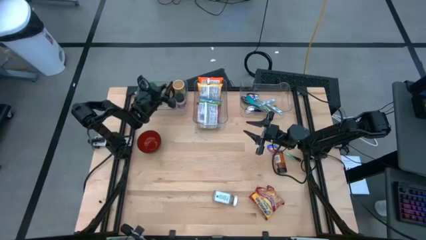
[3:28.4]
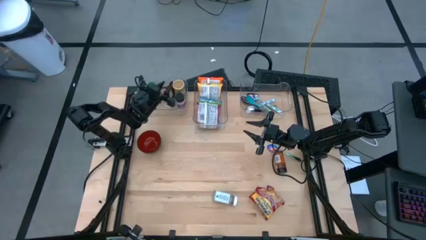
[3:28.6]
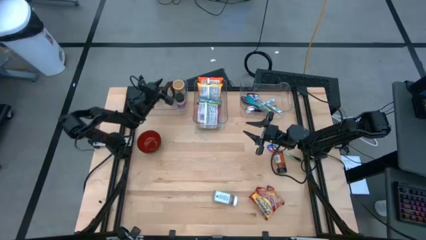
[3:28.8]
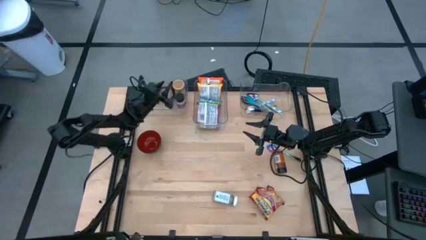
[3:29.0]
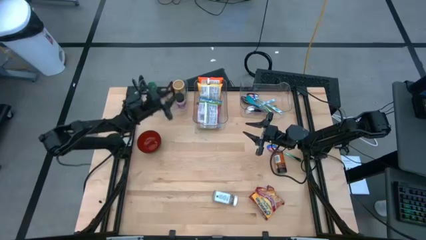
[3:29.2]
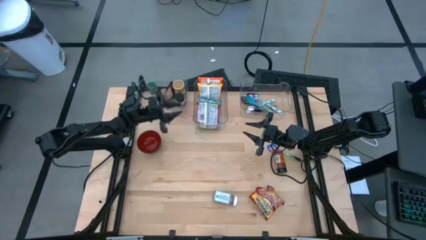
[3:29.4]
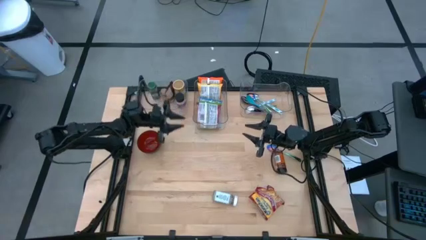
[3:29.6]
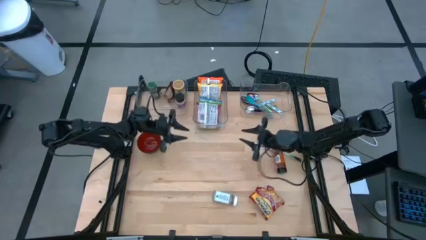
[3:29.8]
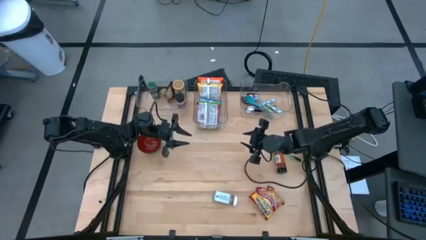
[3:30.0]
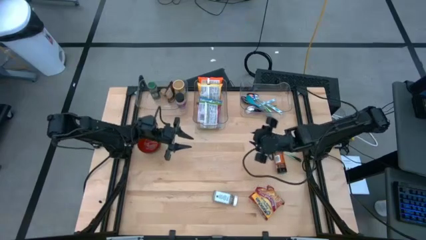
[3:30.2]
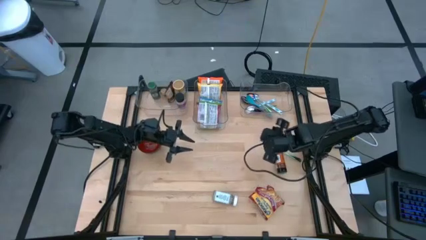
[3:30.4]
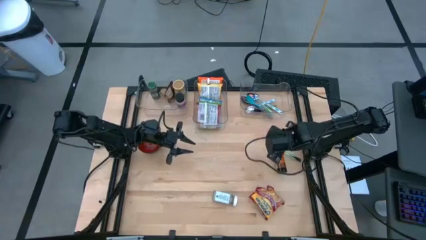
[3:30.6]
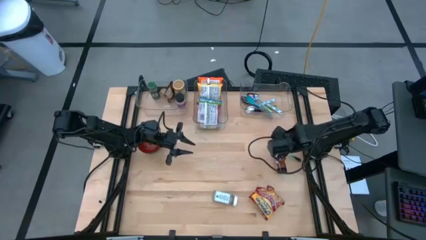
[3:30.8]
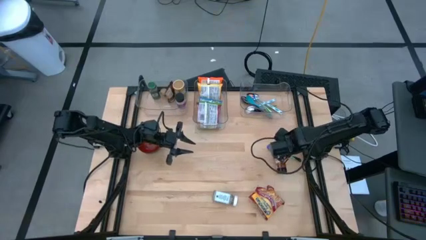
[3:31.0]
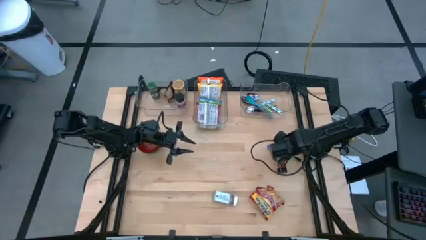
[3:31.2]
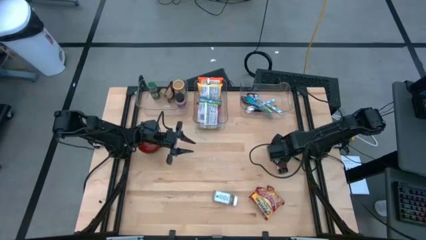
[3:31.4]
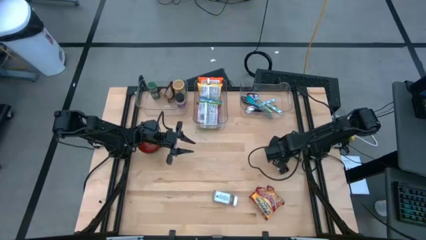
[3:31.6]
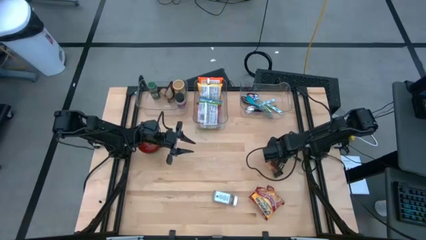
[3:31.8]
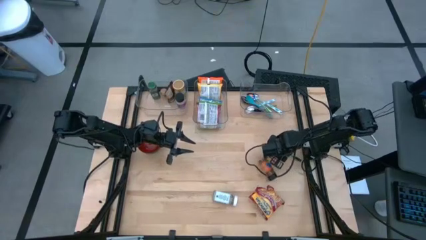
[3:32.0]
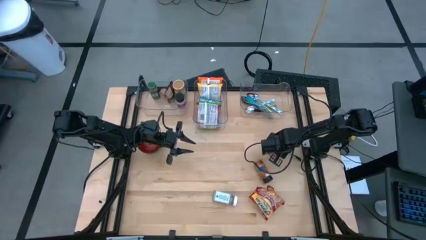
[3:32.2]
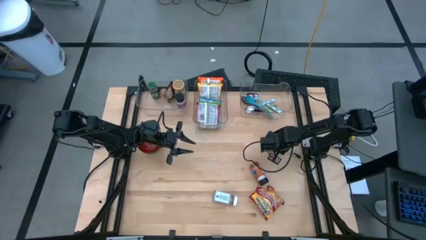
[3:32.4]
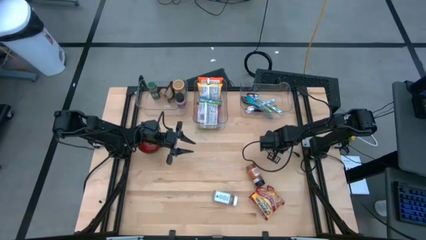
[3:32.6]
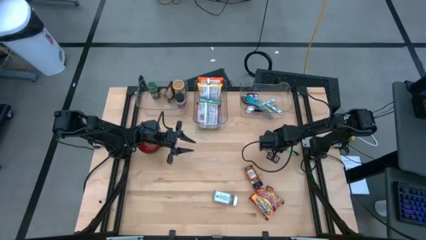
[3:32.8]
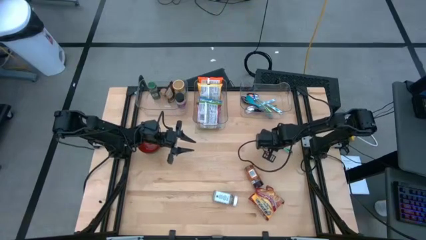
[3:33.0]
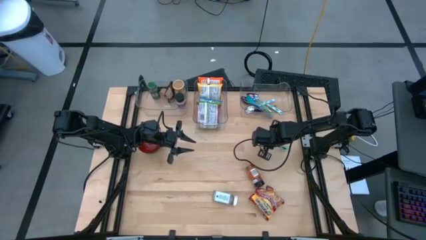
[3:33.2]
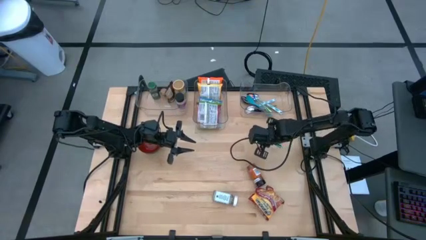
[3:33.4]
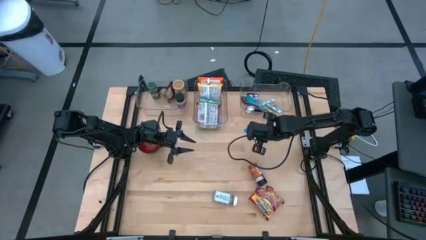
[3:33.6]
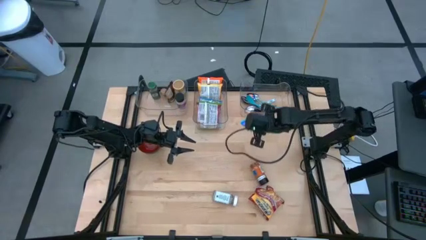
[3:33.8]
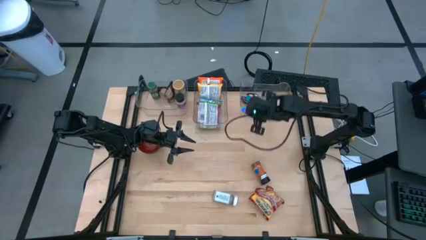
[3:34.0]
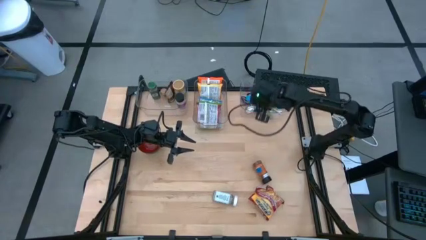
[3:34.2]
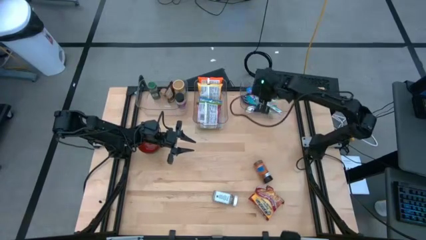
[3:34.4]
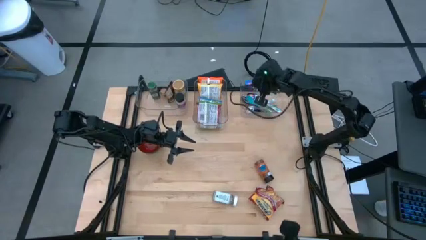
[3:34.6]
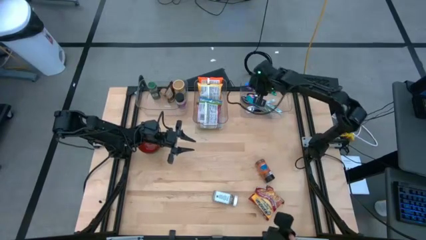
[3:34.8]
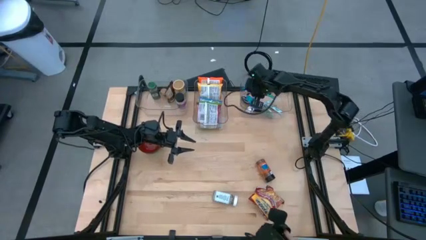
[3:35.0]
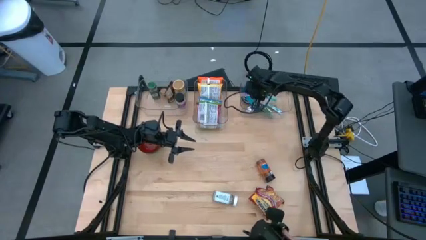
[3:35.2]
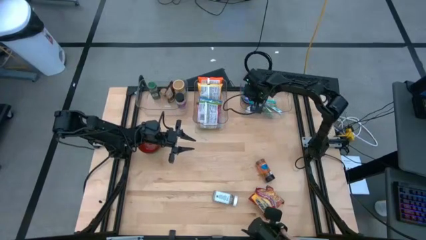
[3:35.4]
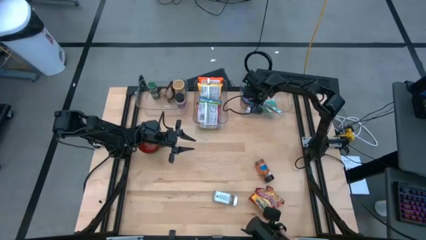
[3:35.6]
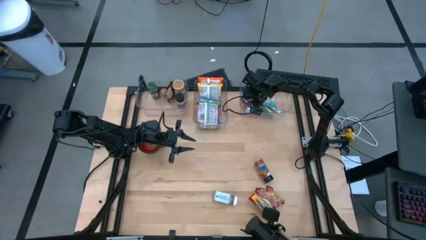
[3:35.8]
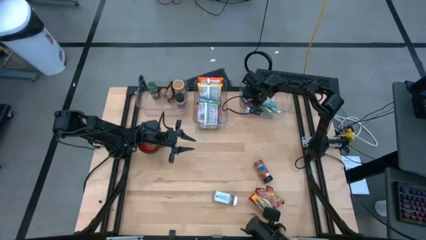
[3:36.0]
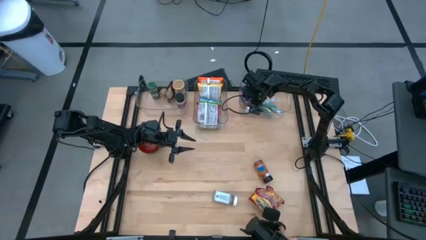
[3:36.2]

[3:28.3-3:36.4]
Task: Pick & Place Food Item
Put the blue spoon into the right transparent bin

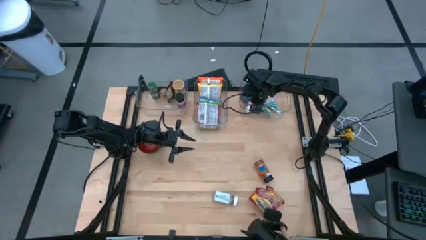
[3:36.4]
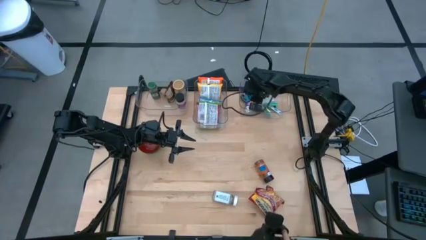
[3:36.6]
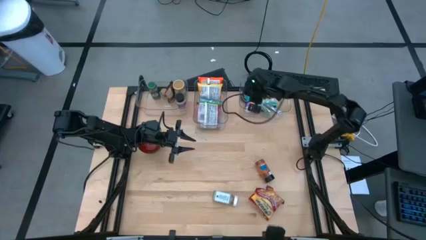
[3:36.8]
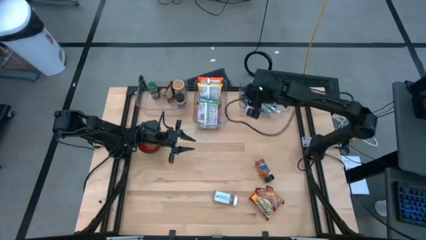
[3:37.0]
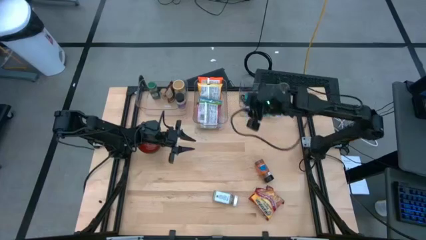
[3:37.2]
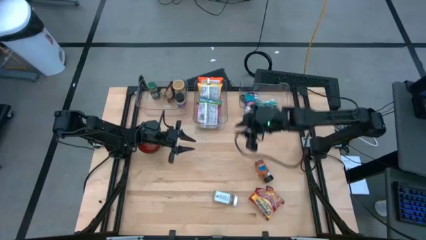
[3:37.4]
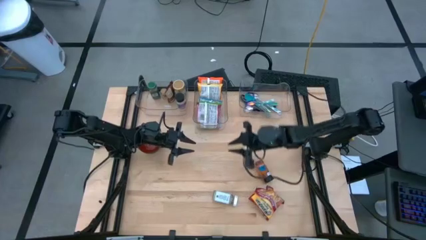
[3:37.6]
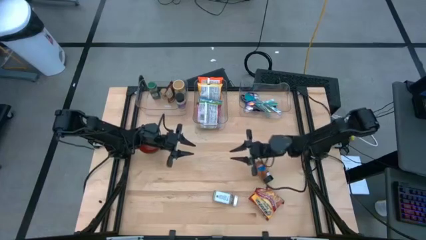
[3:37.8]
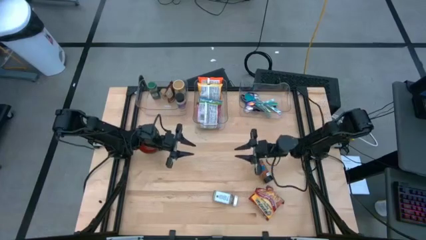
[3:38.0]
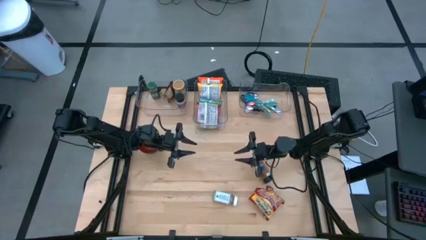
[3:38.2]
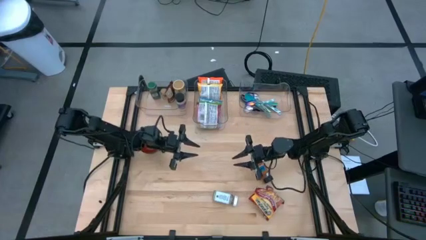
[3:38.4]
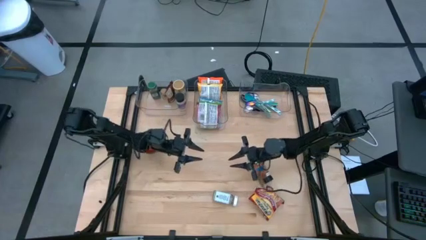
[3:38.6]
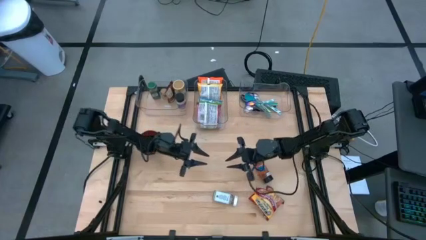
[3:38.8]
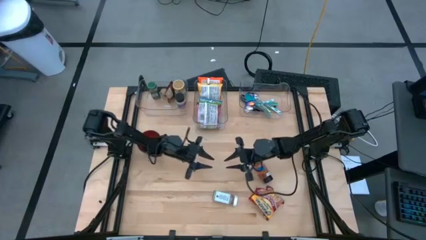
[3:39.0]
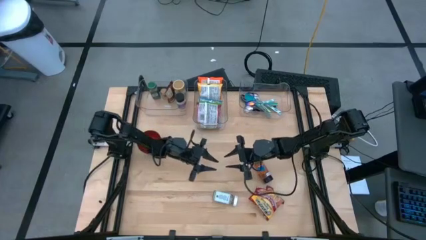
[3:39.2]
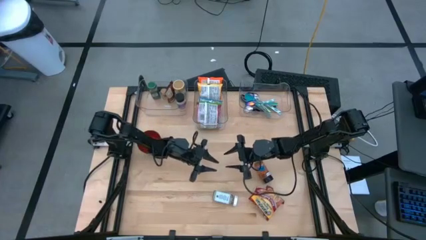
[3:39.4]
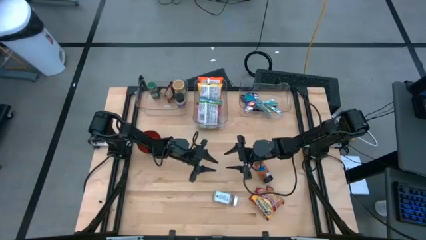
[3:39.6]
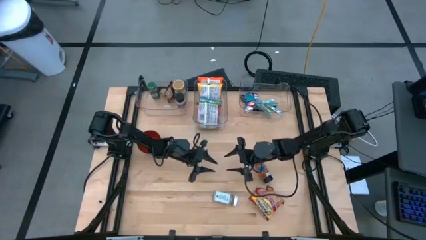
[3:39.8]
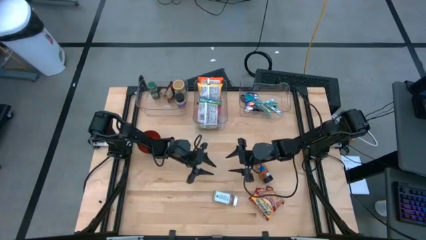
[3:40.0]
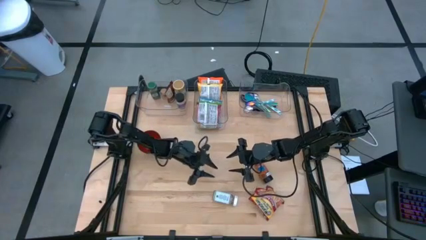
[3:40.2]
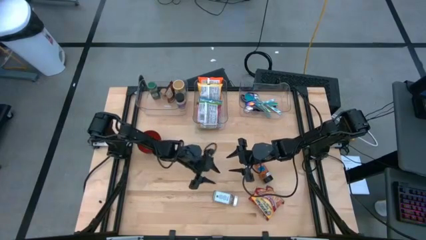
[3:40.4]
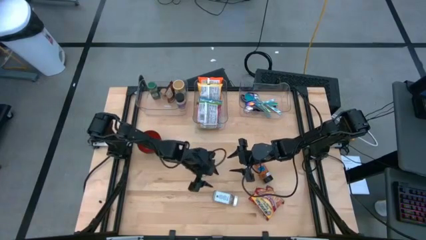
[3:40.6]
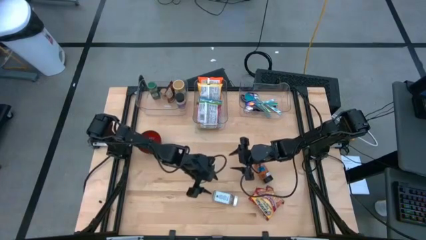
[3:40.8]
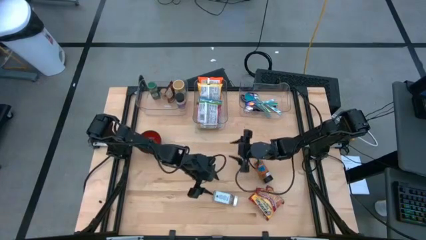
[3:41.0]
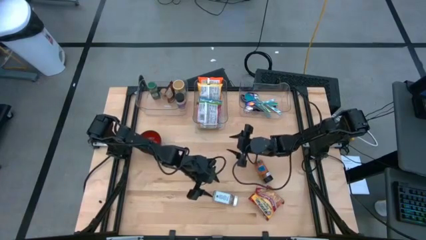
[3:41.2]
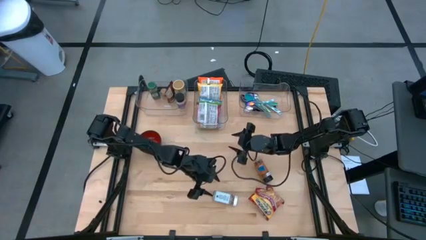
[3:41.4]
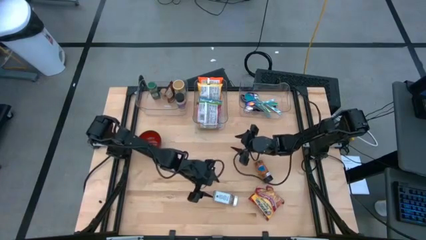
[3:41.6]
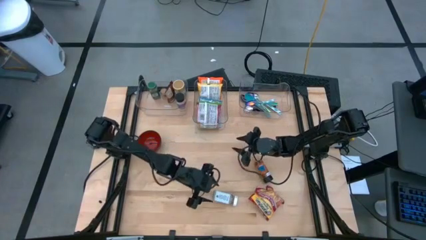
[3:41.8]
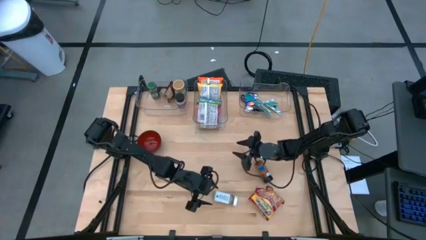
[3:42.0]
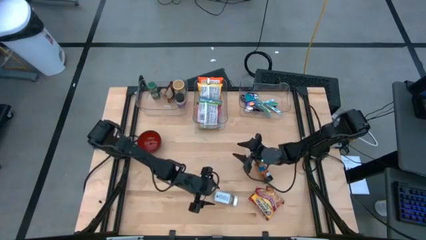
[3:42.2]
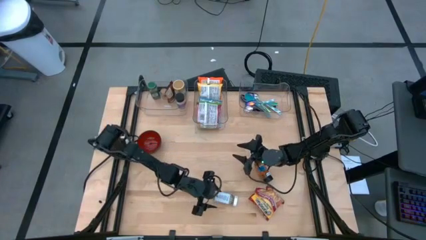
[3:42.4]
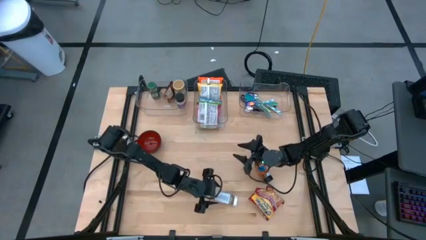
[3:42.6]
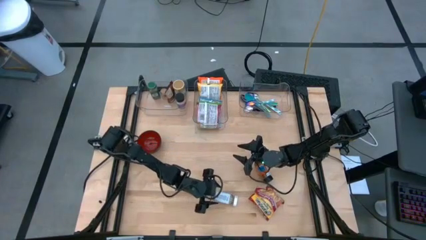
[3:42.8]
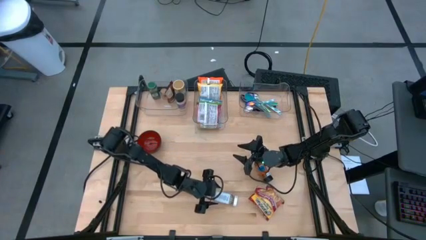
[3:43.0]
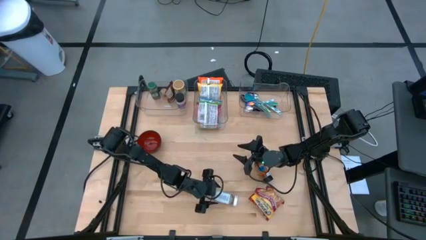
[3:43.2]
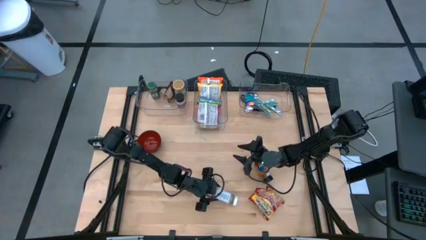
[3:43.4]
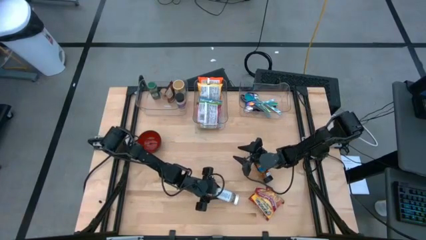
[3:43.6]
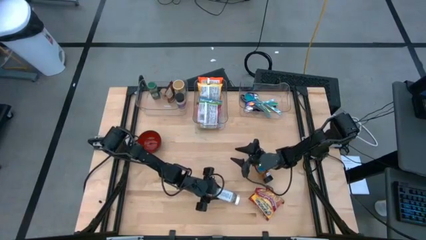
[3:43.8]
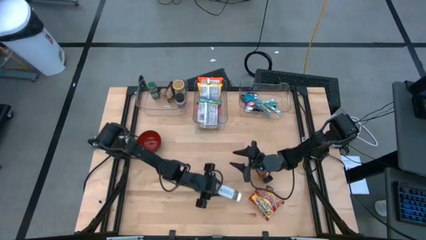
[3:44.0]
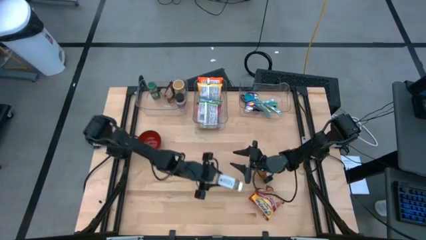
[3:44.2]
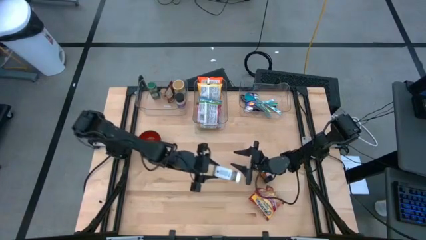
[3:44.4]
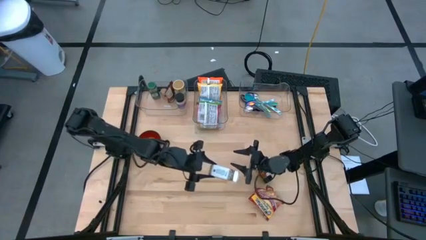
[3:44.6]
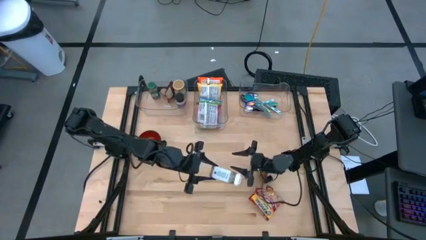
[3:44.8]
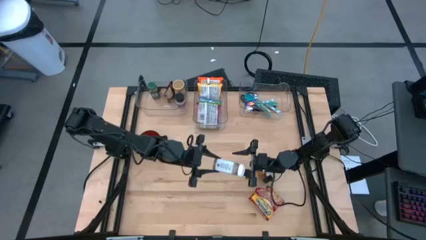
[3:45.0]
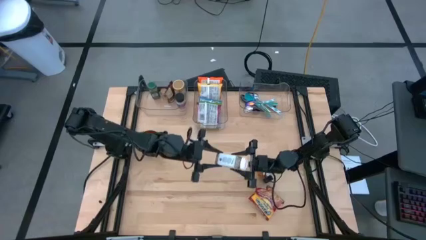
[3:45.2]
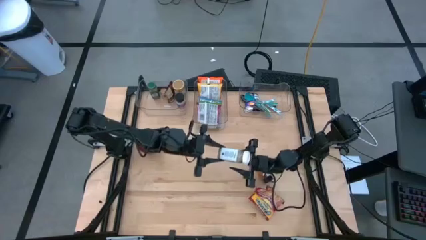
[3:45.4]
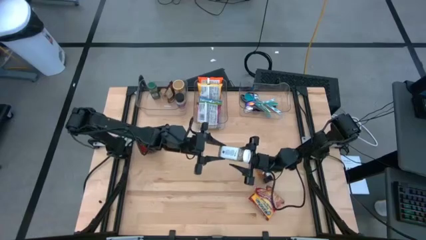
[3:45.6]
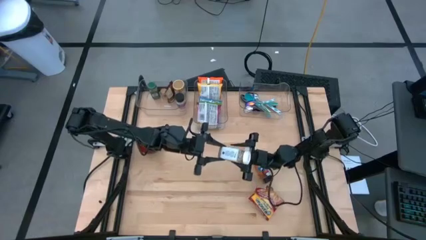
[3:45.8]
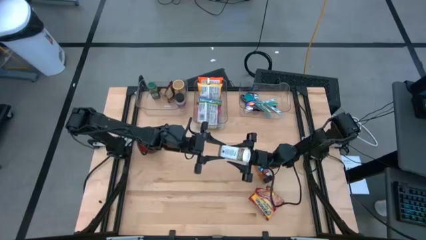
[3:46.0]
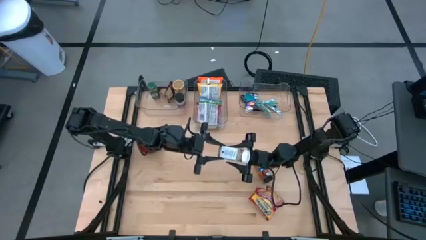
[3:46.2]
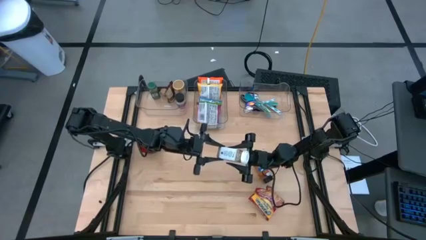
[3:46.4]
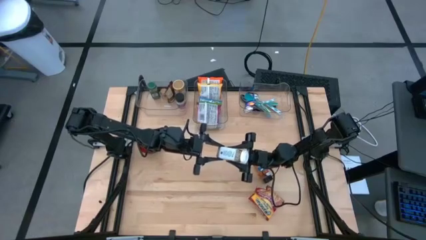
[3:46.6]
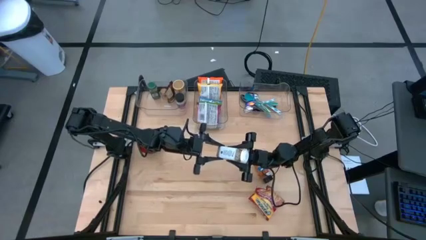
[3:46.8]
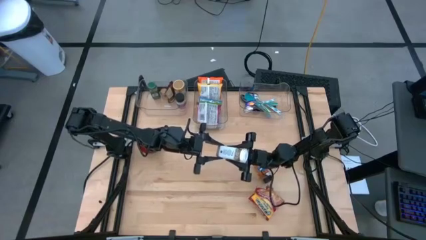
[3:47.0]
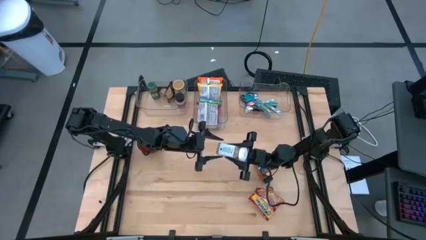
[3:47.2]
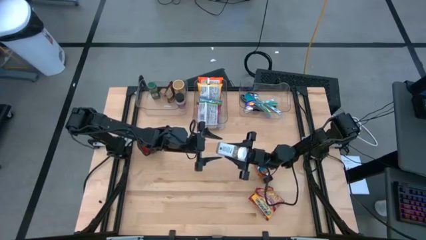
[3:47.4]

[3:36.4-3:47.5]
Put the white seasoning bottle into the left transparent bin
